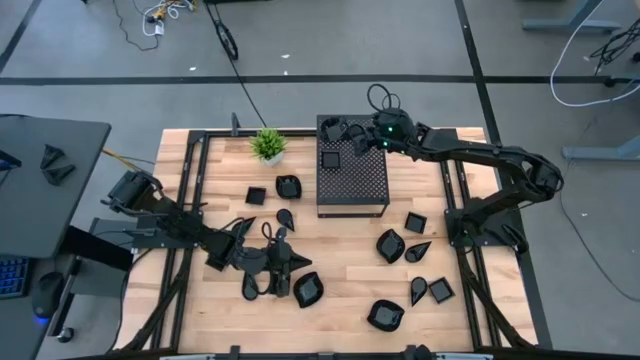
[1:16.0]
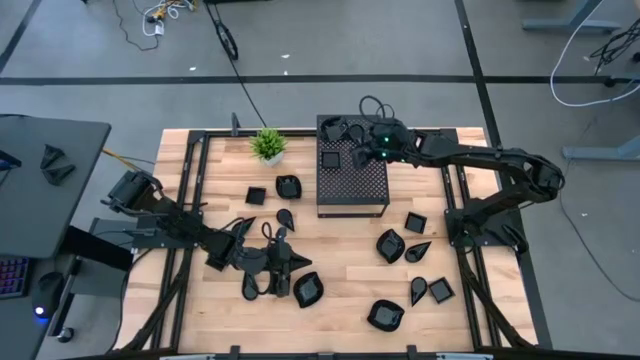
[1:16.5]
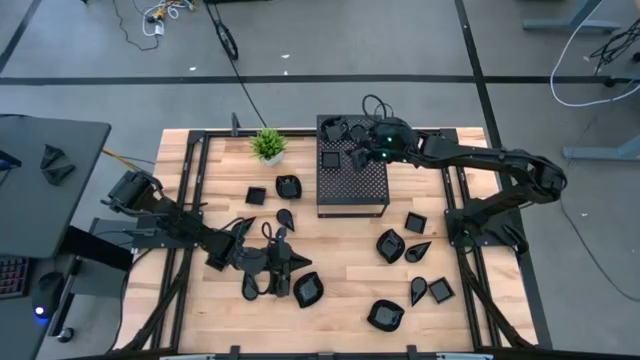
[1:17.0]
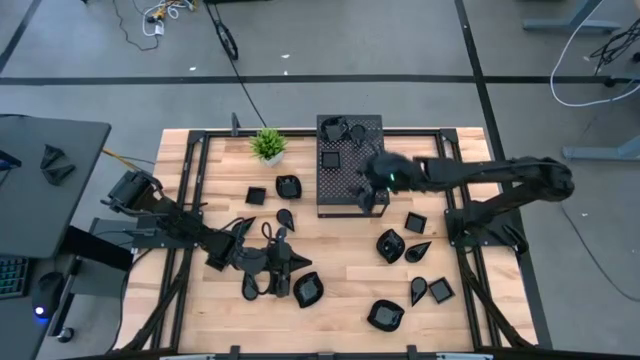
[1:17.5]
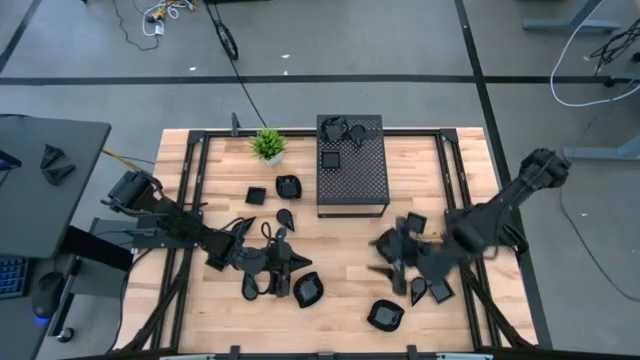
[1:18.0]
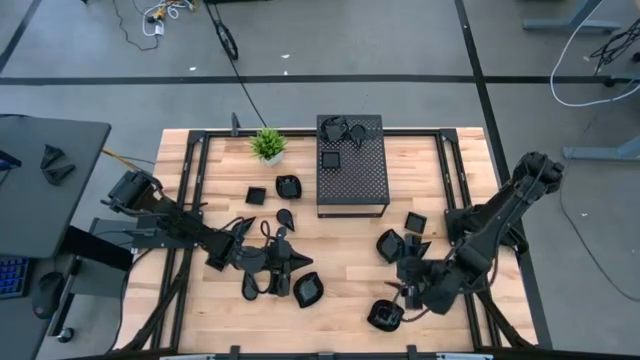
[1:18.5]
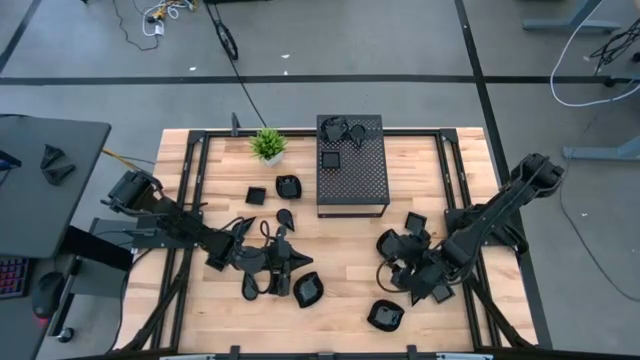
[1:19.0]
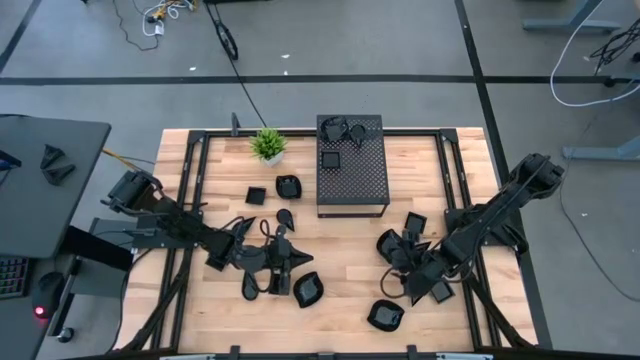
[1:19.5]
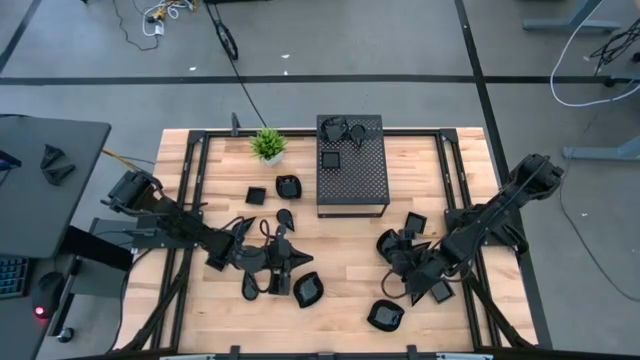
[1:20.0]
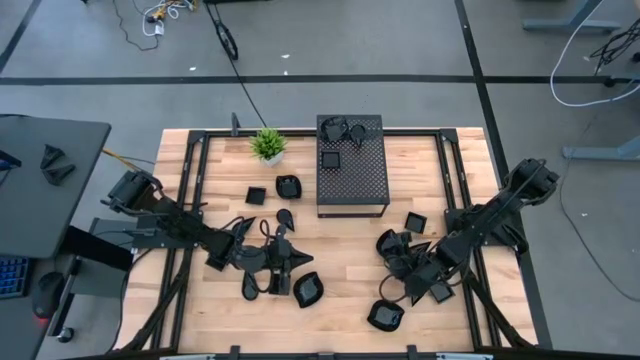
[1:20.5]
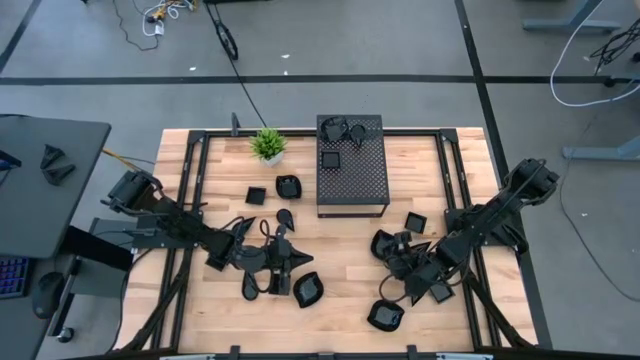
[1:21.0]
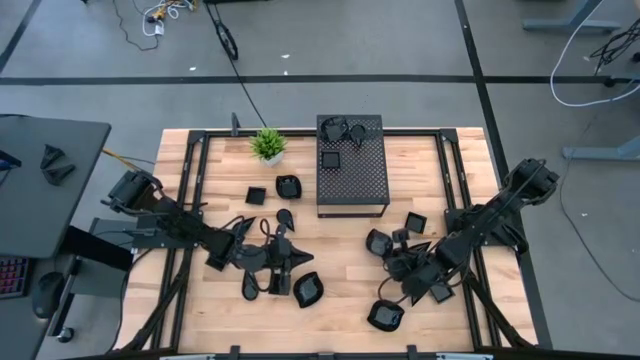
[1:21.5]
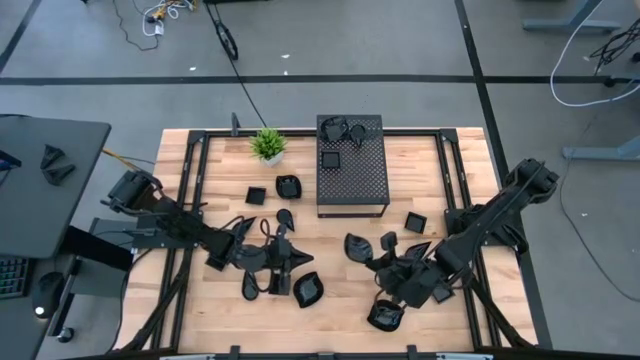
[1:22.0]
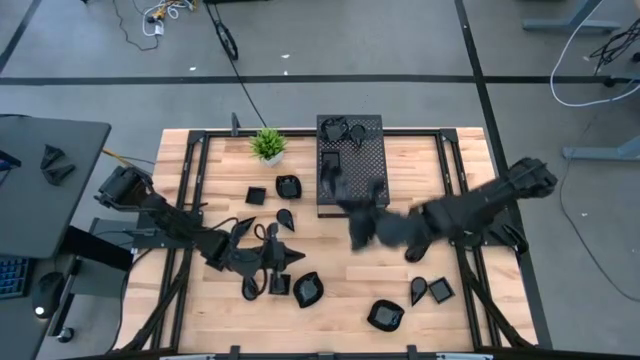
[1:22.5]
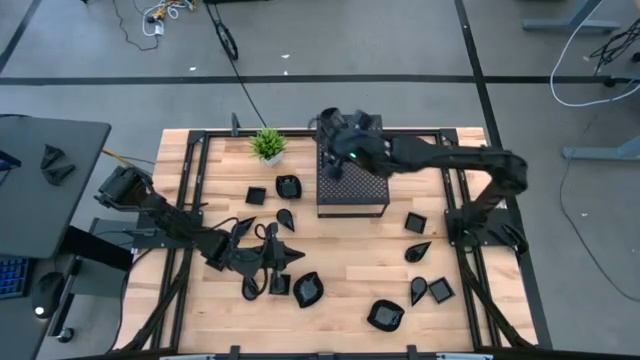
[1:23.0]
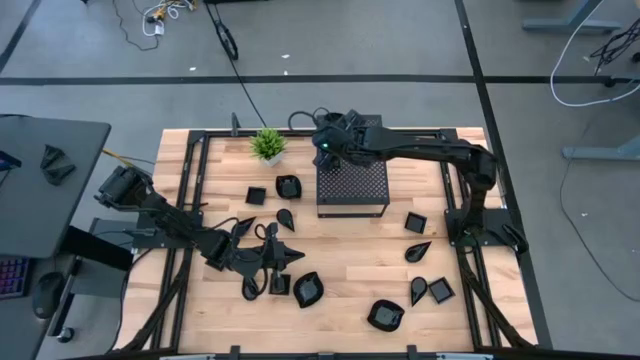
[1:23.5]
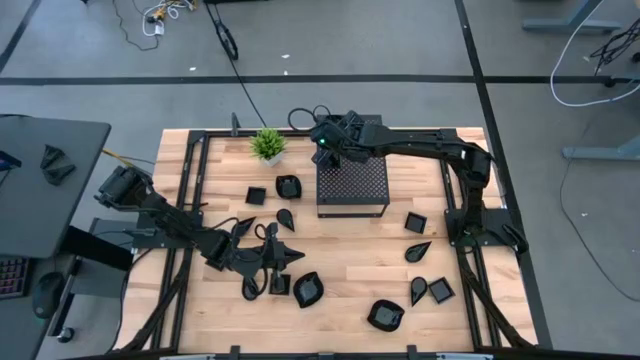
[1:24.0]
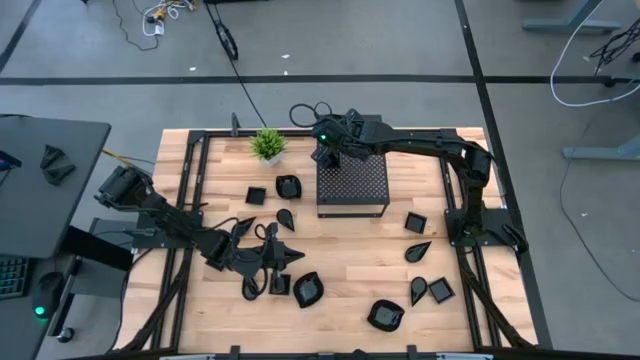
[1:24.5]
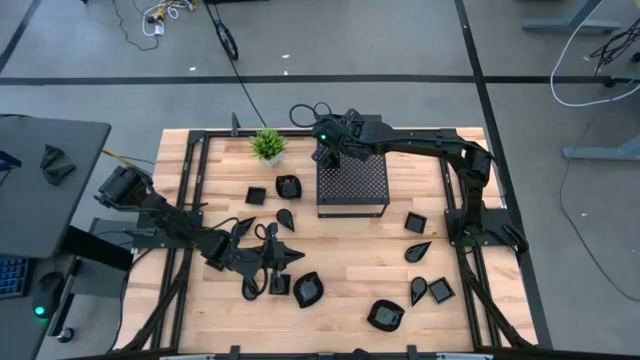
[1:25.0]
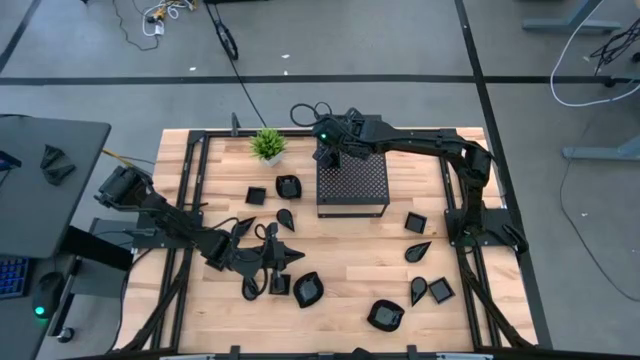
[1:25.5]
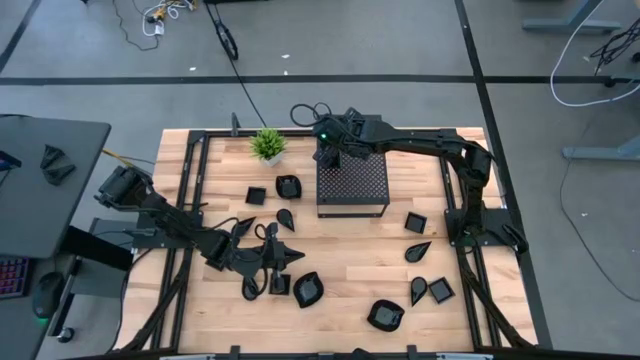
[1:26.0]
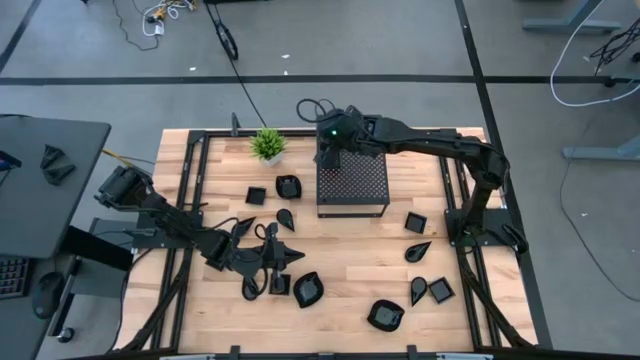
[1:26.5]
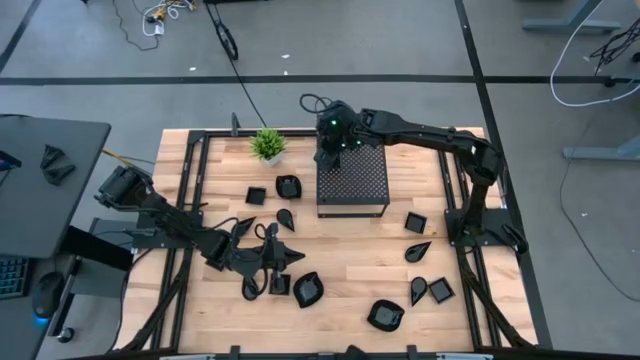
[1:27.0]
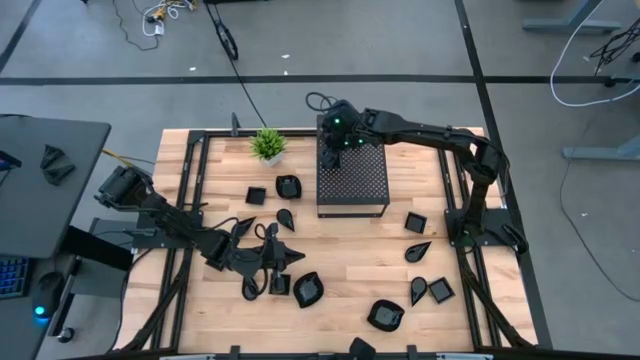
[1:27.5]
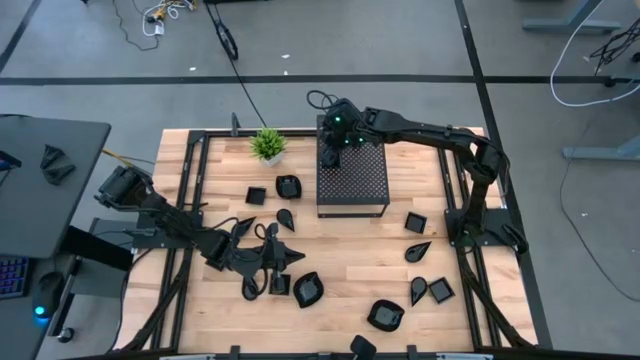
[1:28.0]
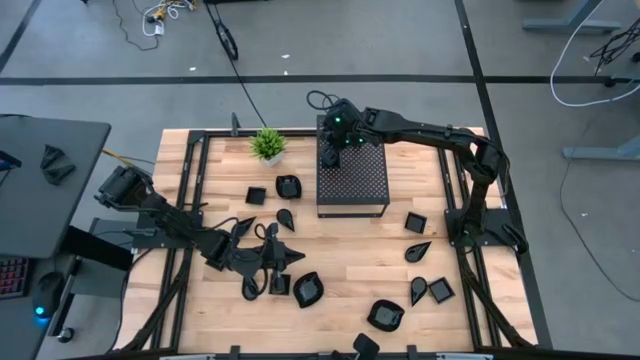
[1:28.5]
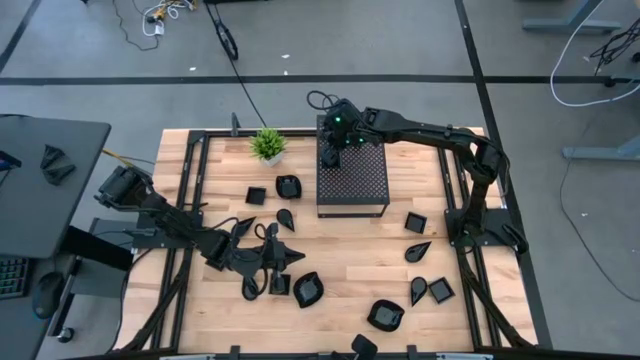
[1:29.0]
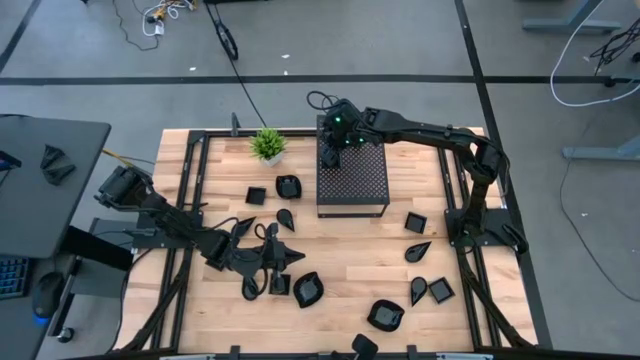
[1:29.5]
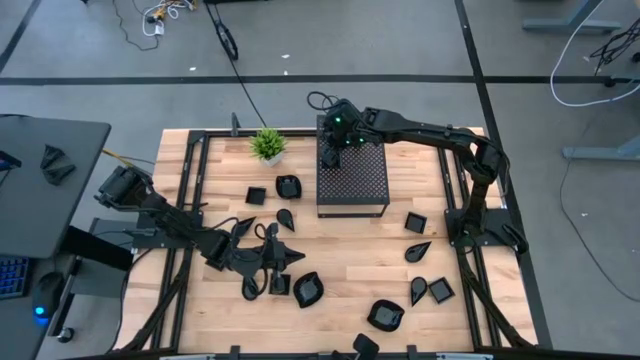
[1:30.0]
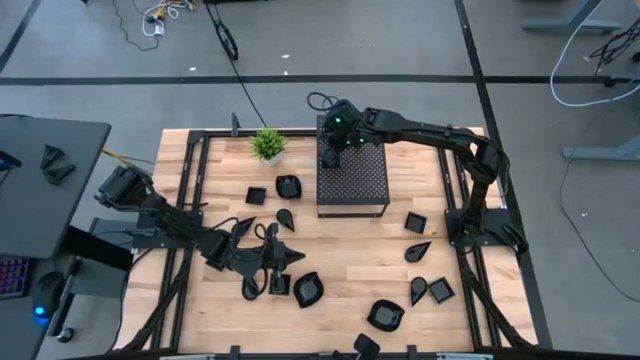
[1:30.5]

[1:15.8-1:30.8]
Task: Pick & Place Mini shaped plates
Stack the leaf shaped plate on top of the leaf shaped plates on the shelf

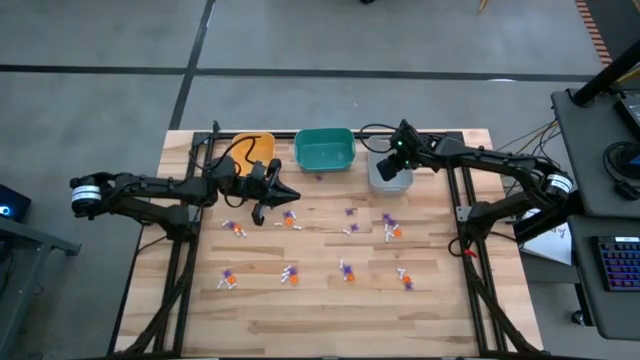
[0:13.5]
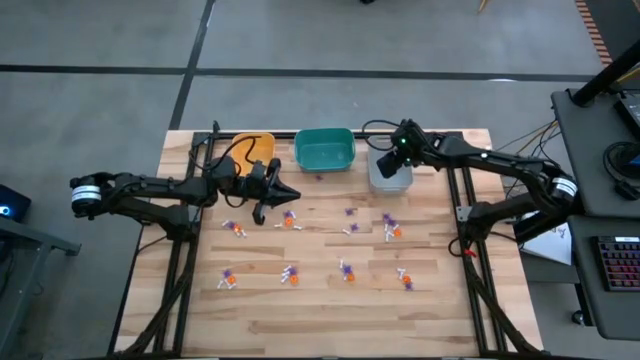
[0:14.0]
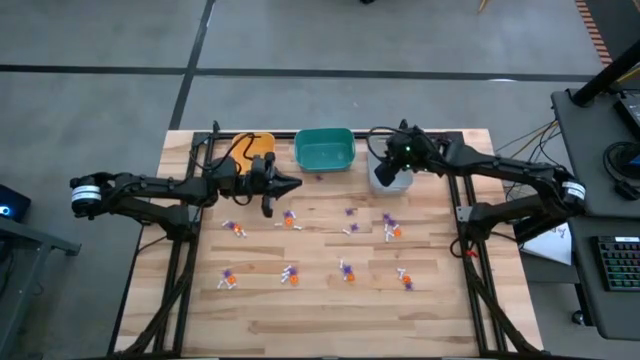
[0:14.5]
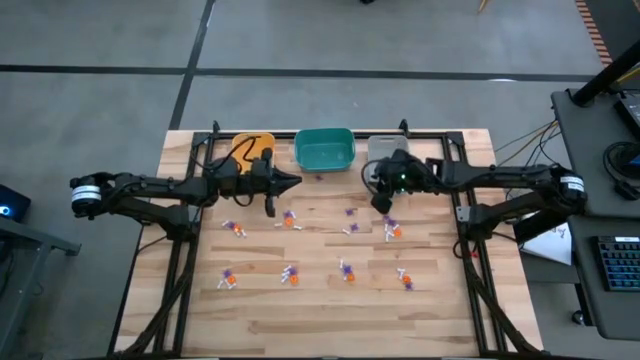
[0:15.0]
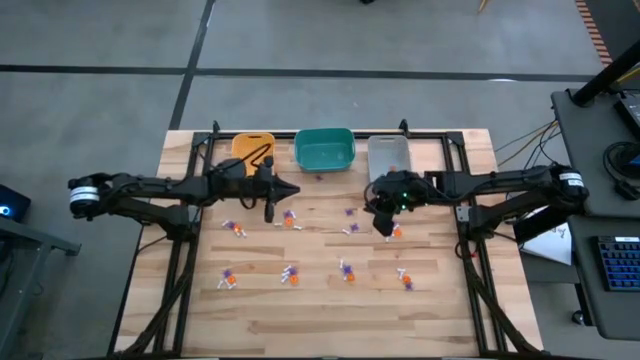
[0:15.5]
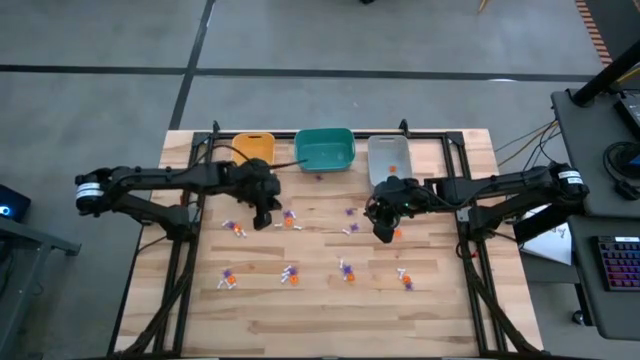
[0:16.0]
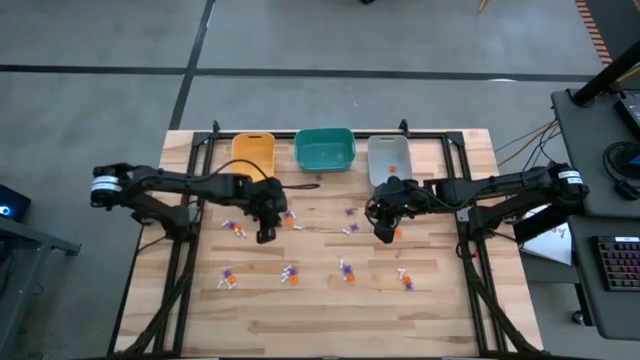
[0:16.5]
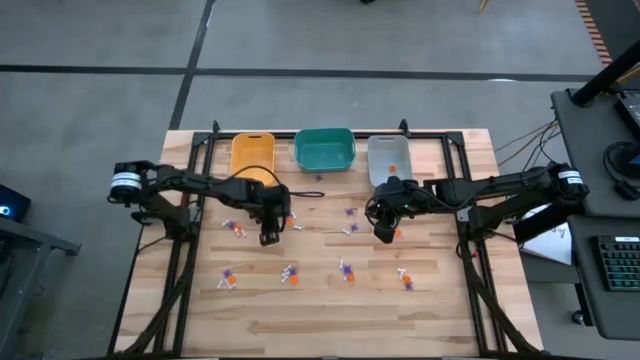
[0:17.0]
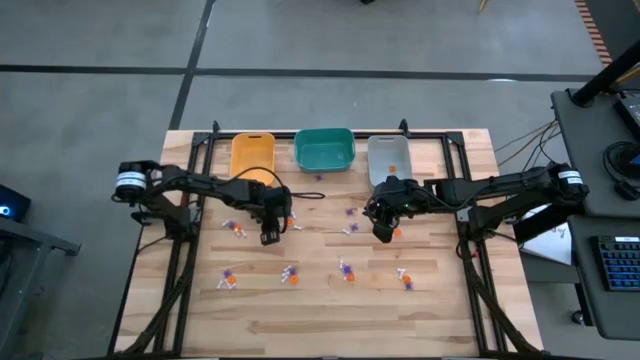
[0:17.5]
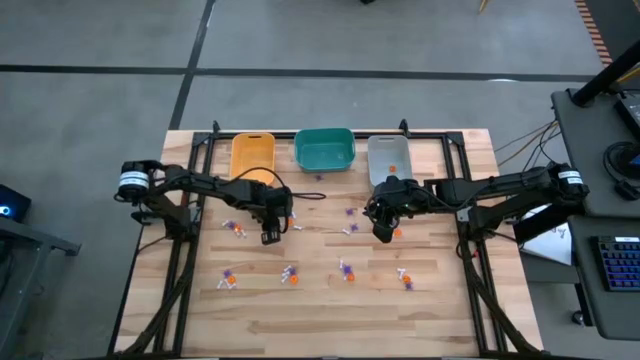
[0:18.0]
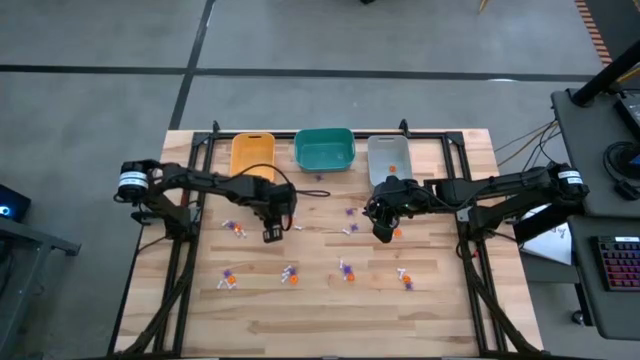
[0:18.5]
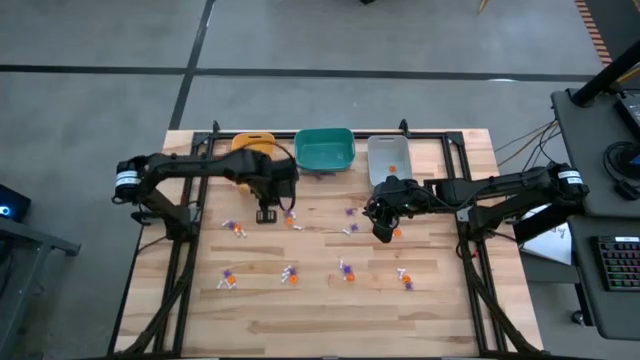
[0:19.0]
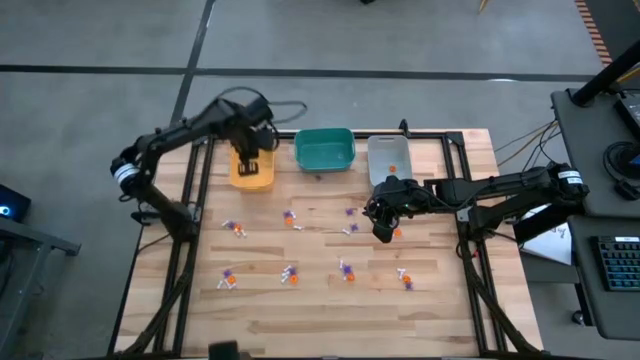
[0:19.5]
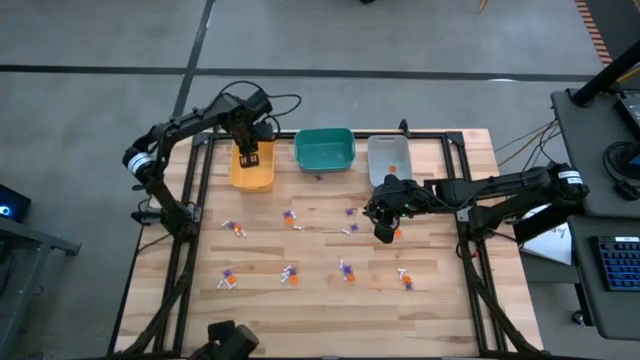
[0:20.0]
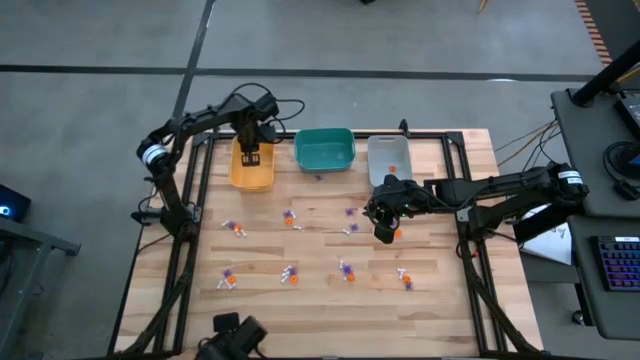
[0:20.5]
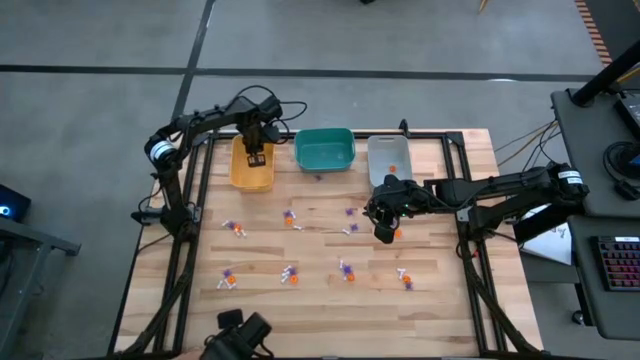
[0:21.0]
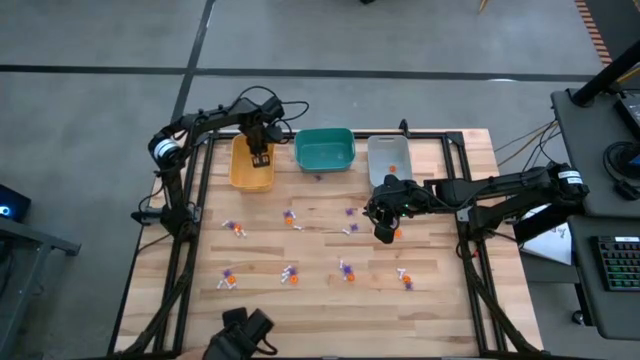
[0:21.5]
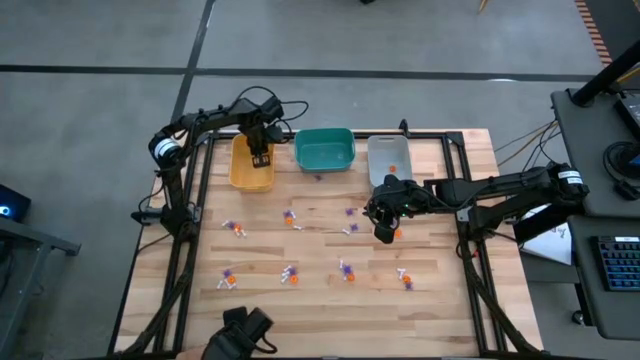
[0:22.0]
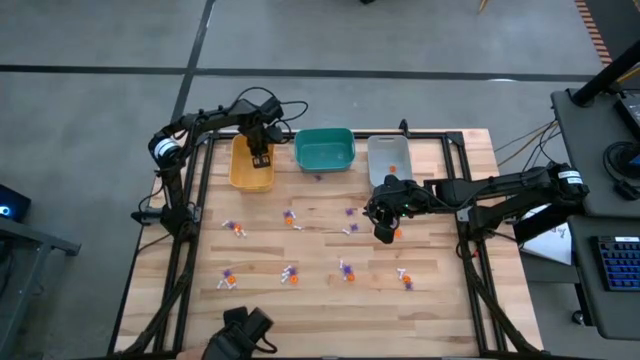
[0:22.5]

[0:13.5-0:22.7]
Task: Sort Halloween decoration
Put the white bone toy into the yellow bin
